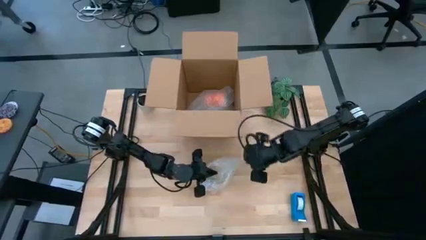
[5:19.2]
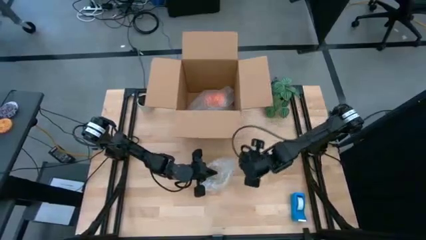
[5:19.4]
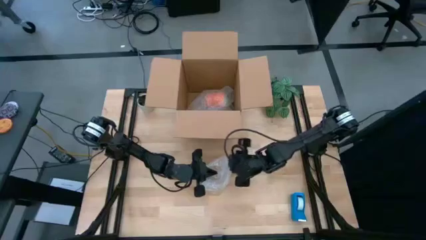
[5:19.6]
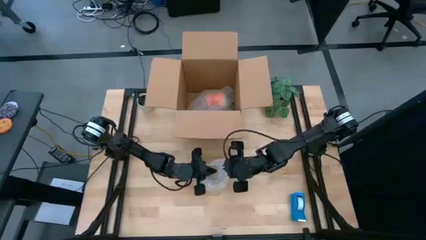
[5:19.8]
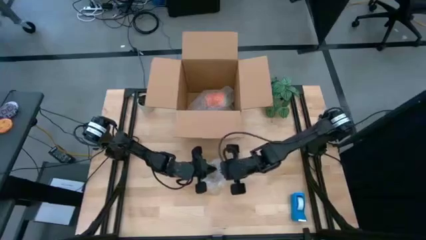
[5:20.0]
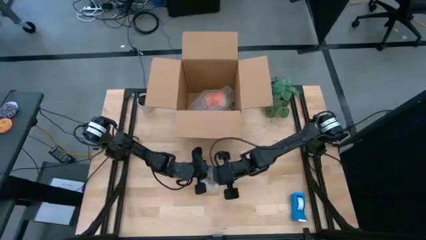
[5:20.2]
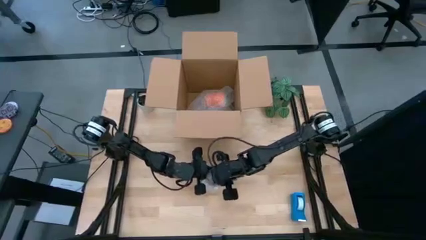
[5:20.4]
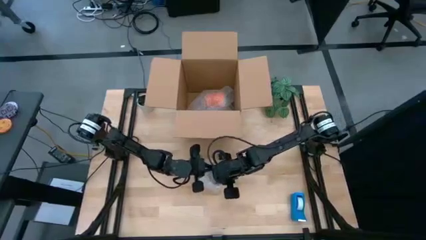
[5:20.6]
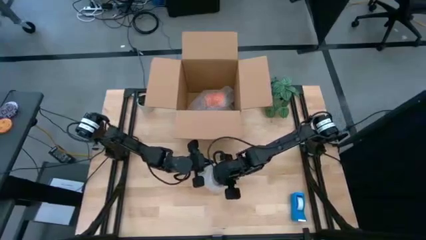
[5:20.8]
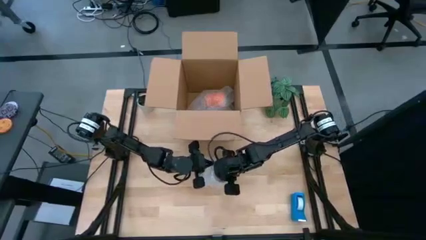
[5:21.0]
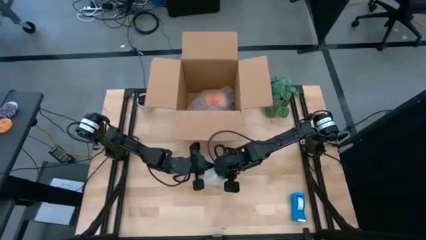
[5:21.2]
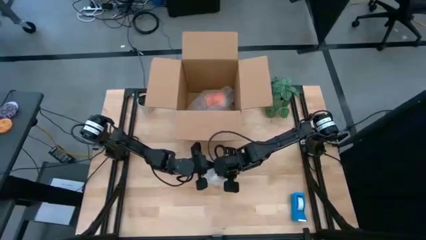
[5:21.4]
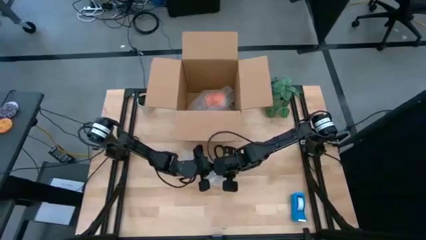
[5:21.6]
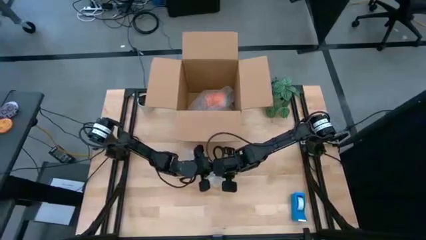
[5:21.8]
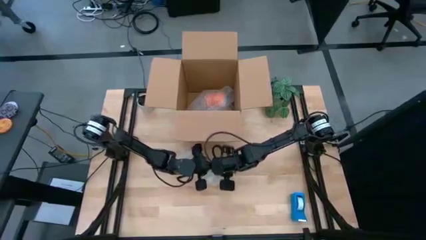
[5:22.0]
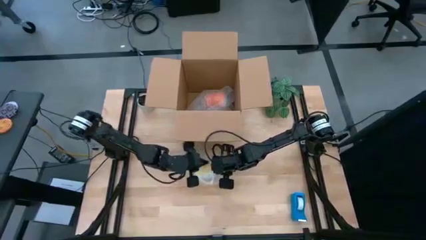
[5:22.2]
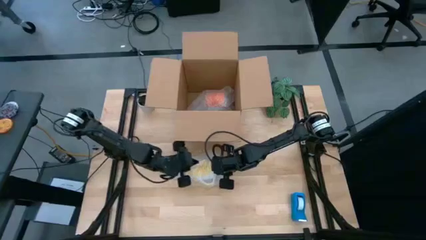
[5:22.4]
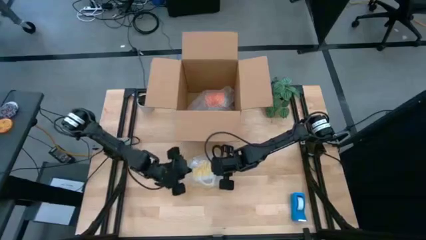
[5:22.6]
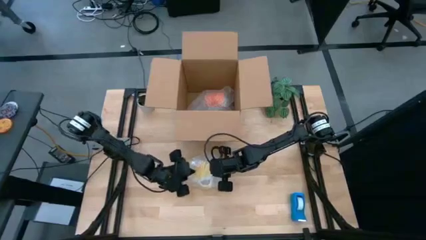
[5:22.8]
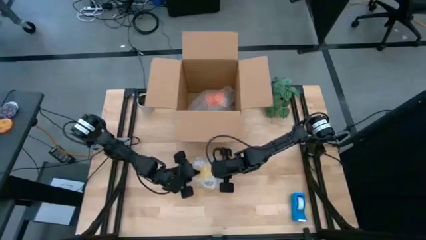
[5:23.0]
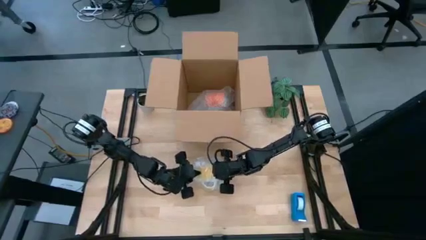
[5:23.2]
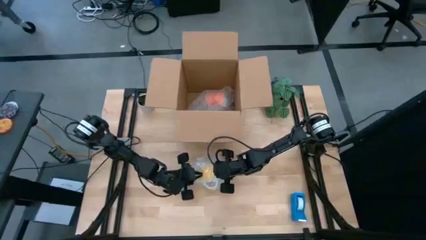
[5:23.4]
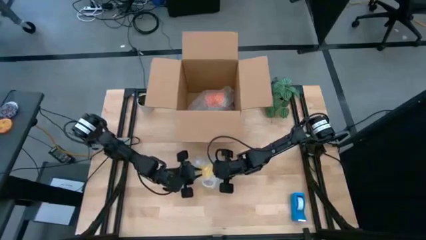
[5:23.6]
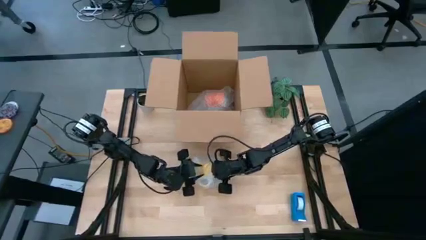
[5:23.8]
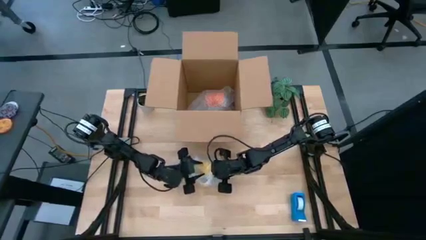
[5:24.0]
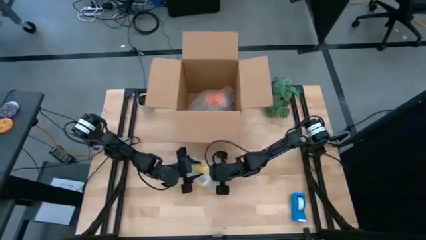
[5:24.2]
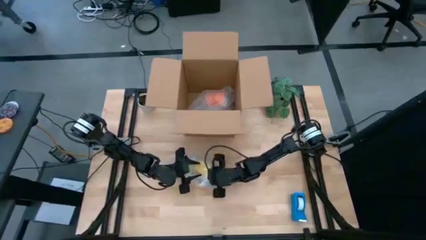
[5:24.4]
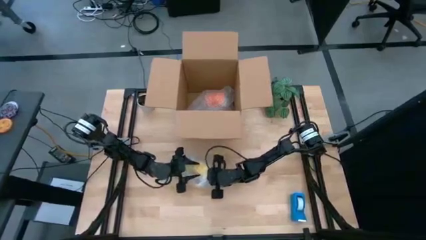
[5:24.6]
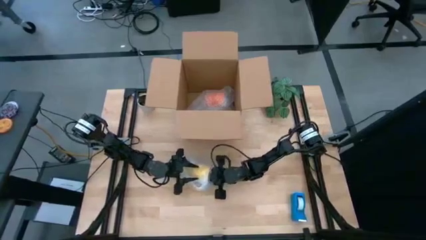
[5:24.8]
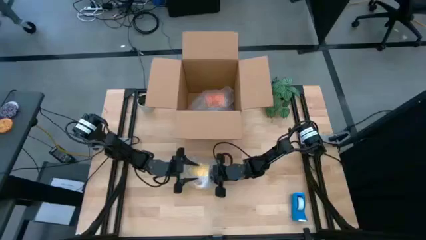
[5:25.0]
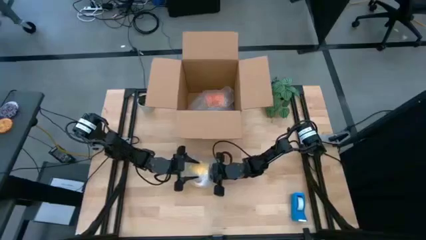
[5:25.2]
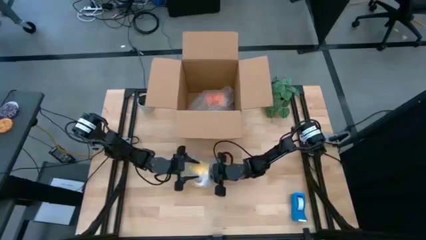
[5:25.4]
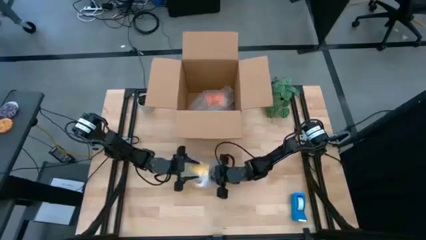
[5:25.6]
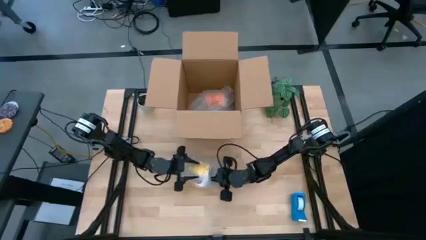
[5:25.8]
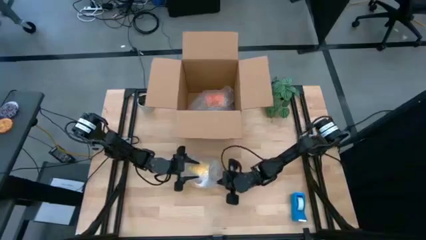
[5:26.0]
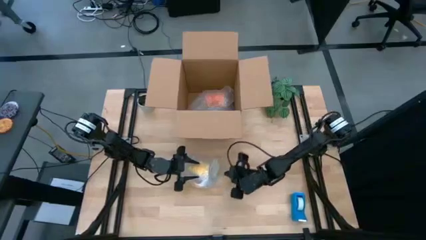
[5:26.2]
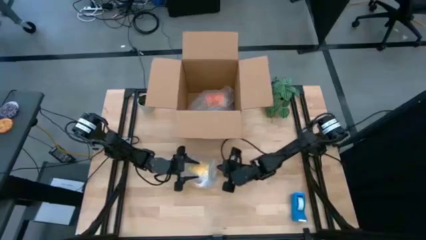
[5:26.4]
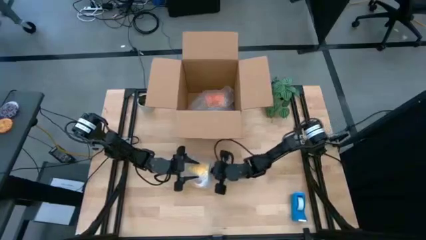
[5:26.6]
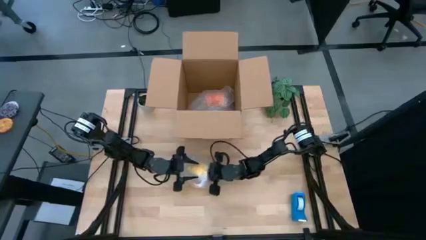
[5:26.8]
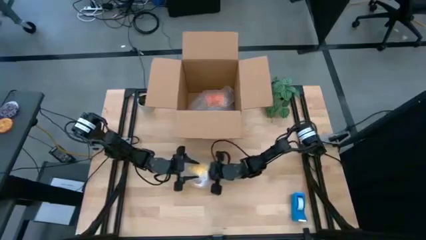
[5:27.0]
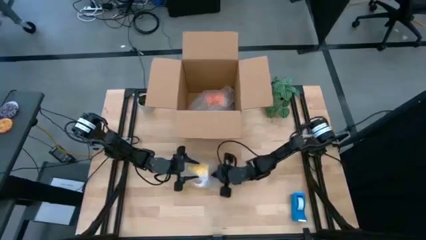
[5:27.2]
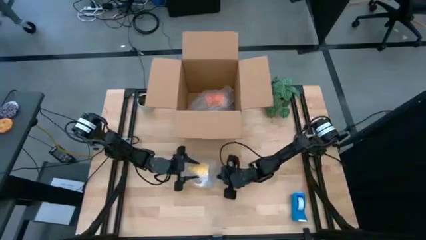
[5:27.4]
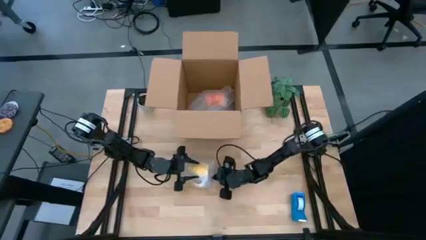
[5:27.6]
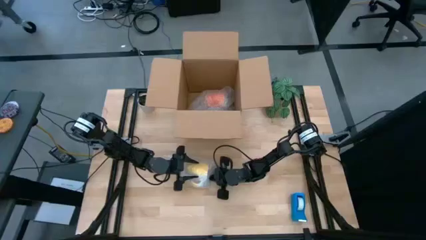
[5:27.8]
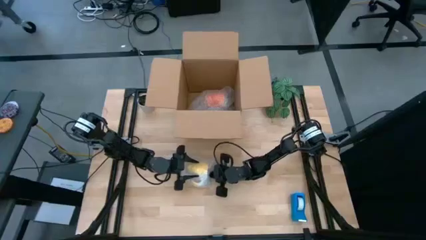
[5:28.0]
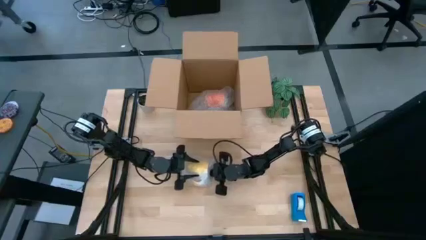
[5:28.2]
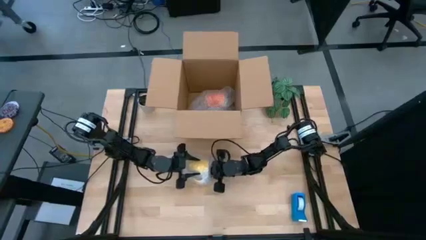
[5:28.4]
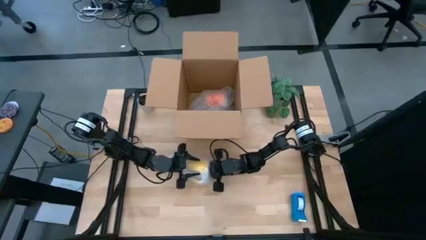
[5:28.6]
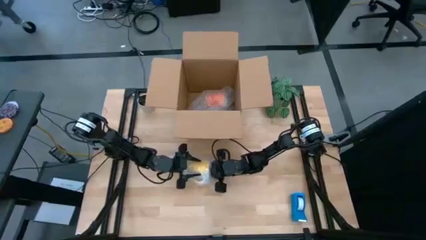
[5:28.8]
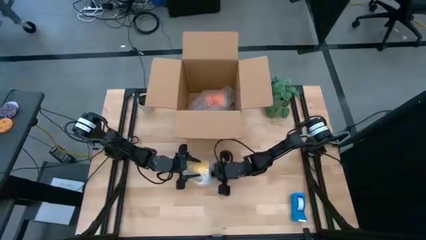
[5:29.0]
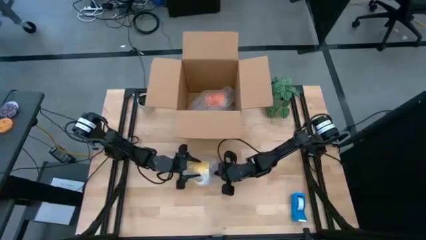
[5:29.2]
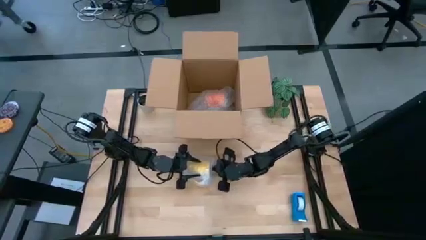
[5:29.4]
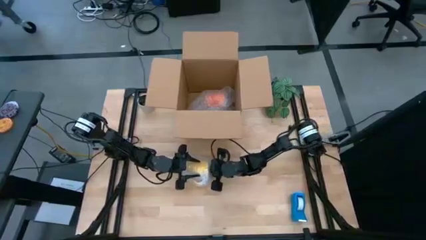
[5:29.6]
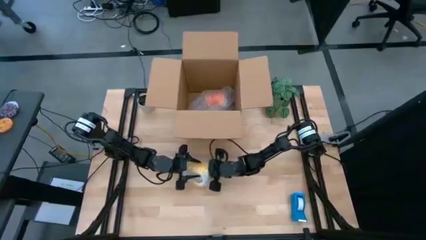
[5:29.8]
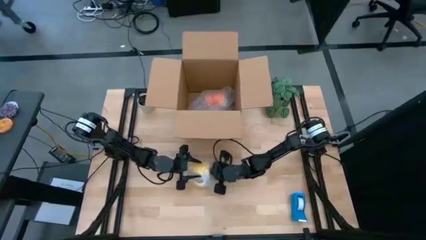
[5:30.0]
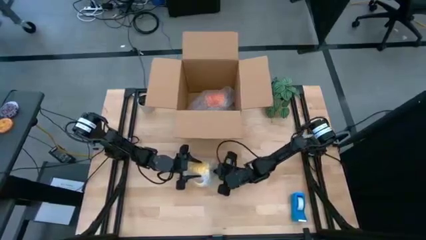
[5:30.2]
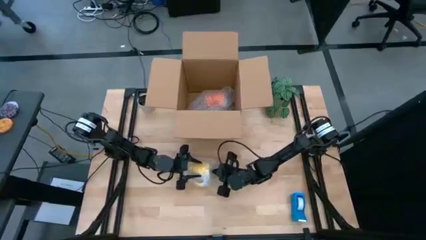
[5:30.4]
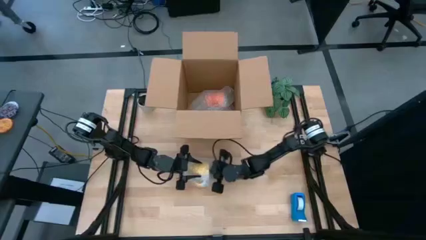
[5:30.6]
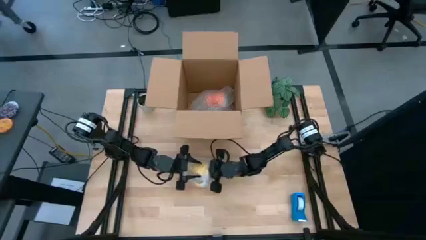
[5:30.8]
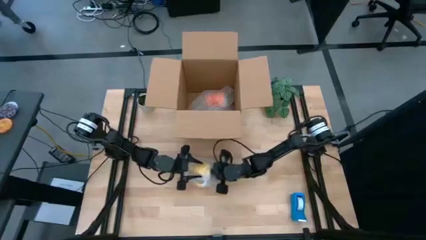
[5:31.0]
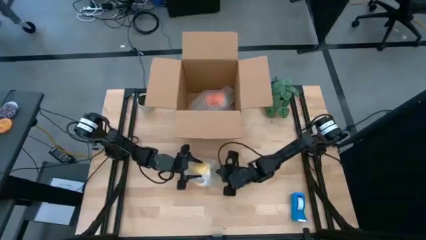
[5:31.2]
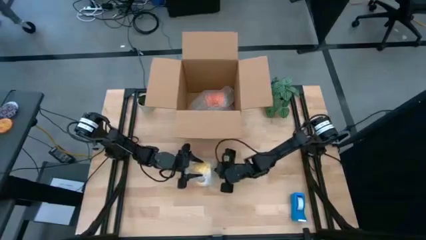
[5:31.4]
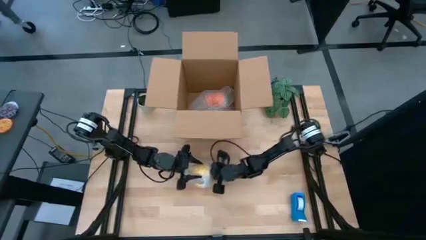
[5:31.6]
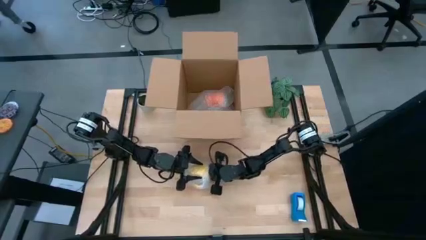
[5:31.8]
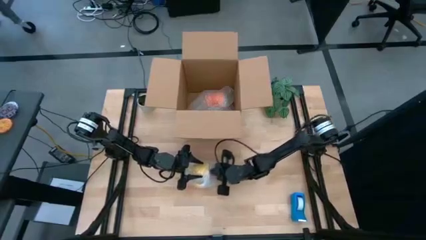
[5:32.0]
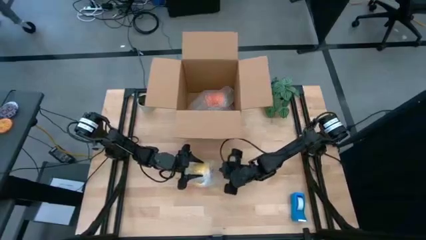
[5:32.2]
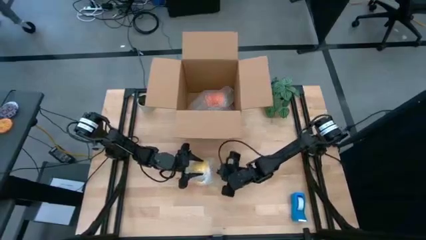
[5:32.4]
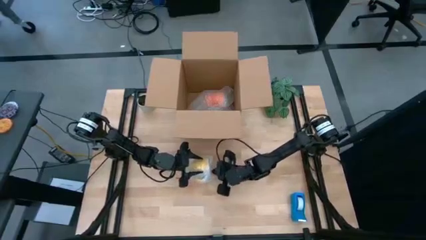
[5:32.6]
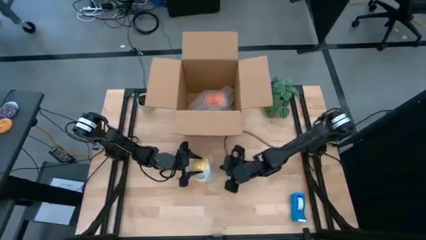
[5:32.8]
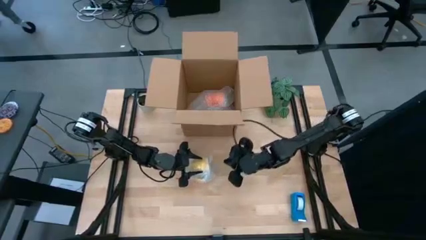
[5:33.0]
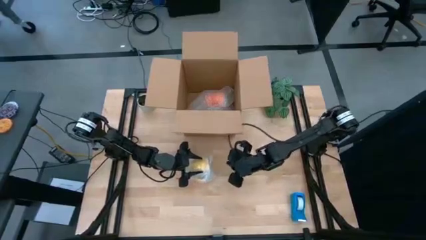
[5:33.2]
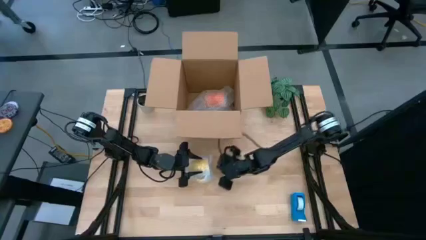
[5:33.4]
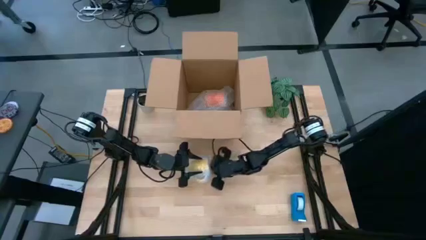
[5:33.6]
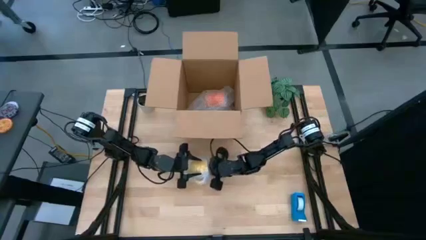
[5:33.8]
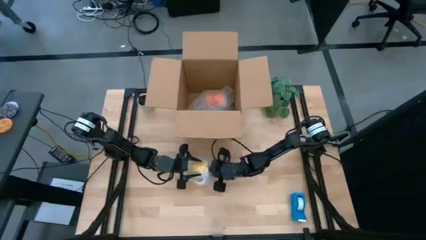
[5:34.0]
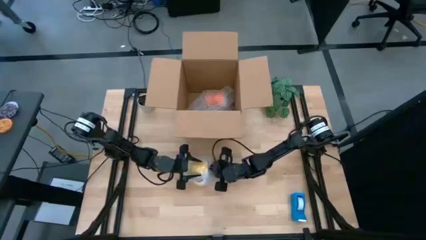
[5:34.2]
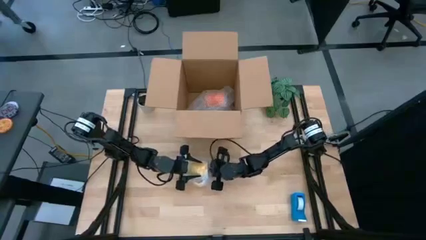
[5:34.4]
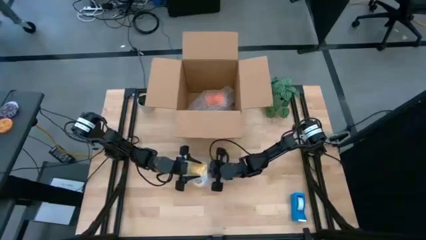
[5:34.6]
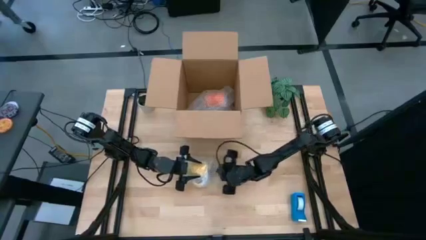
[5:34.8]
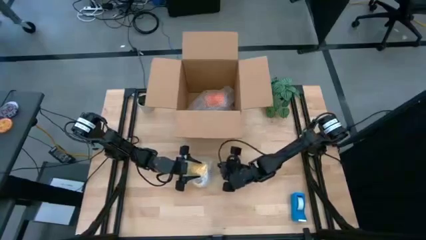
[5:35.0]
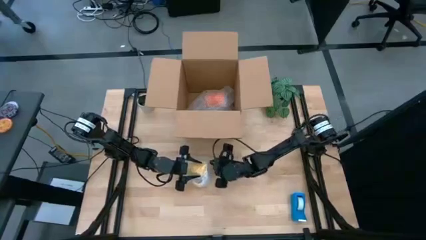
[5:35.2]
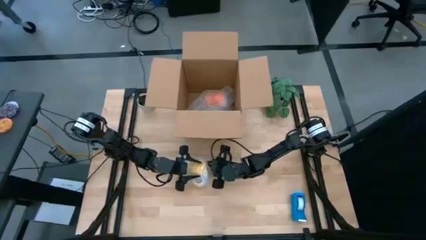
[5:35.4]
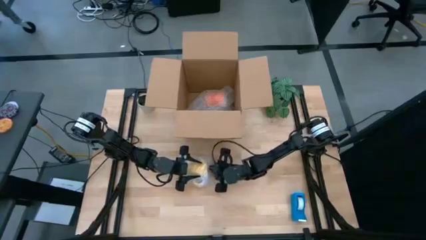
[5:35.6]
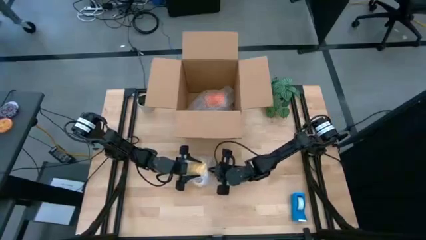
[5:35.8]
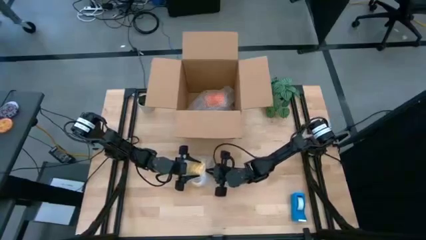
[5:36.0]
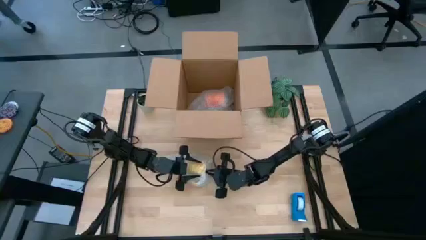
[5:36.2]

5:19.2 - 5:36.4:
Task: wrap mug
Wrap the yellow mug with the bubble wrap
